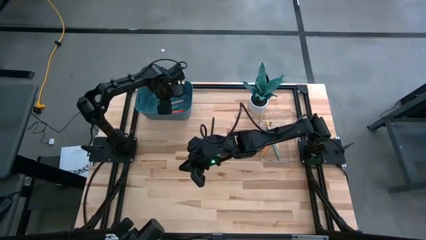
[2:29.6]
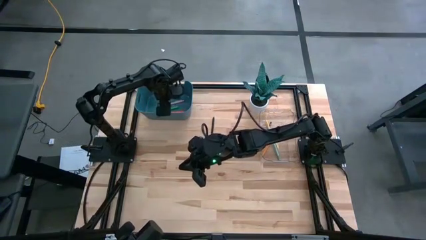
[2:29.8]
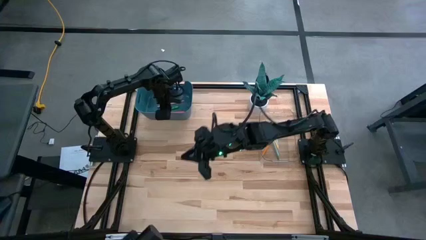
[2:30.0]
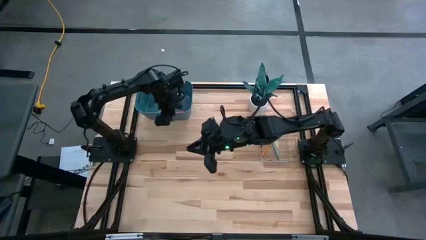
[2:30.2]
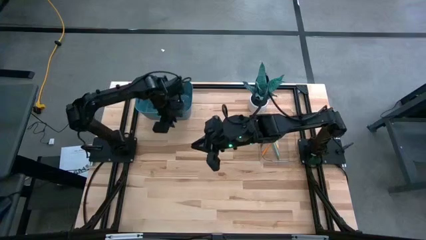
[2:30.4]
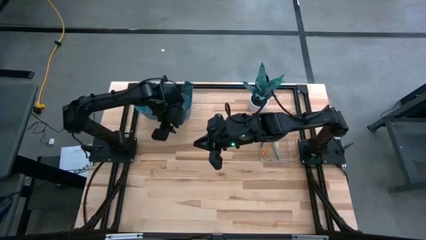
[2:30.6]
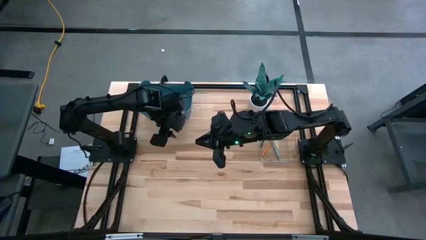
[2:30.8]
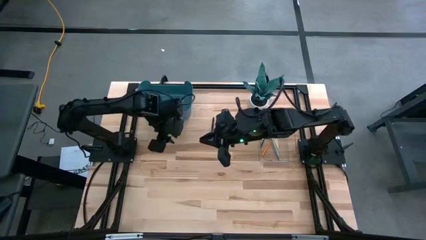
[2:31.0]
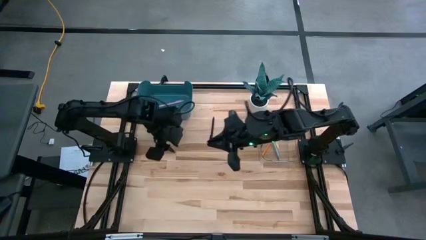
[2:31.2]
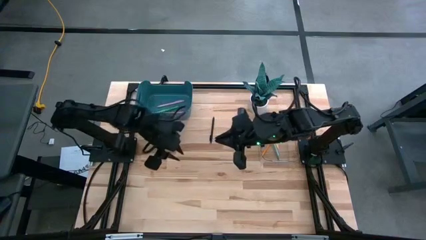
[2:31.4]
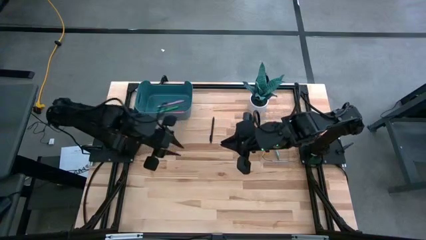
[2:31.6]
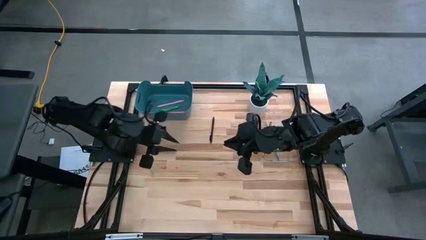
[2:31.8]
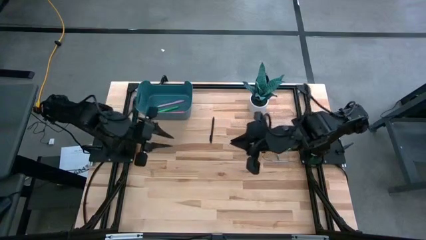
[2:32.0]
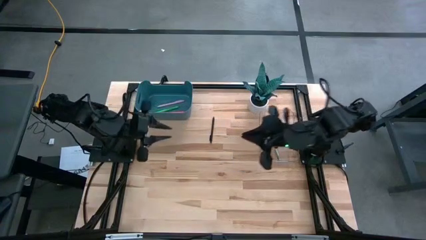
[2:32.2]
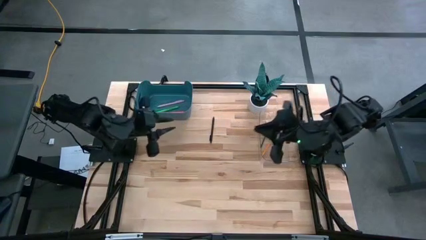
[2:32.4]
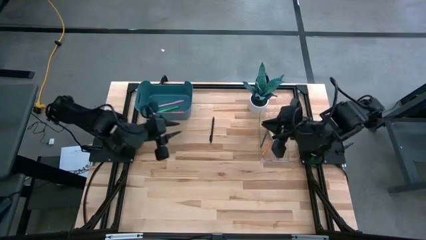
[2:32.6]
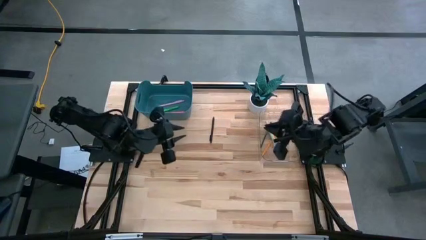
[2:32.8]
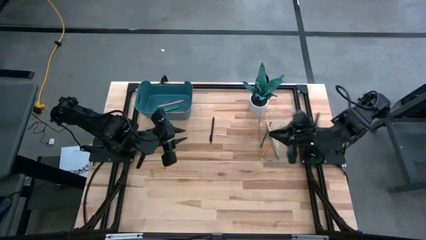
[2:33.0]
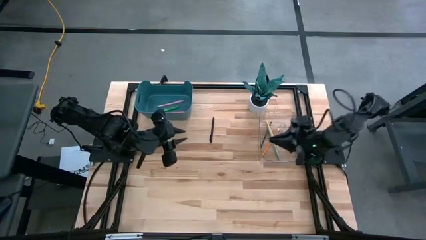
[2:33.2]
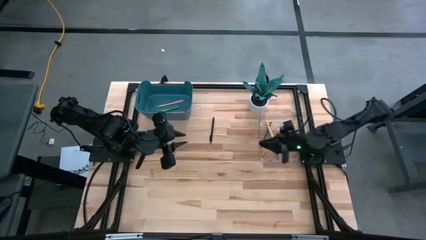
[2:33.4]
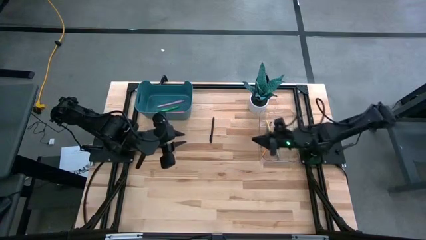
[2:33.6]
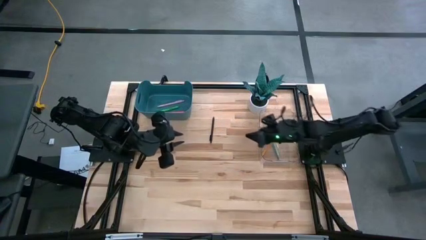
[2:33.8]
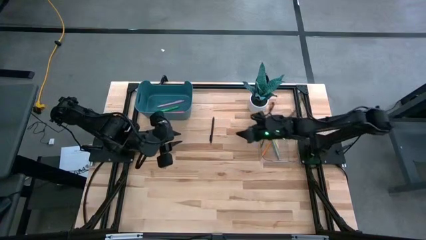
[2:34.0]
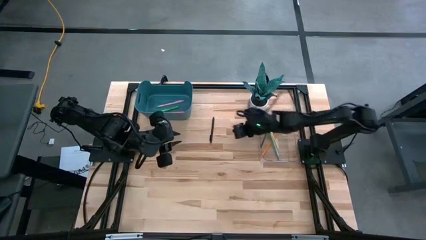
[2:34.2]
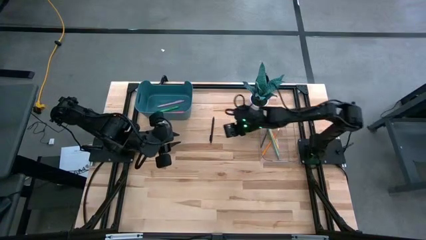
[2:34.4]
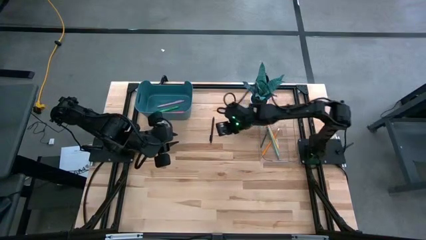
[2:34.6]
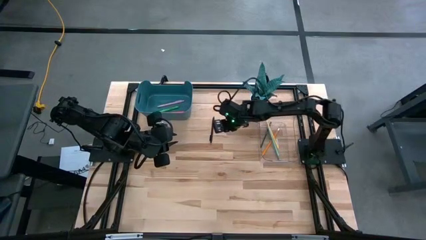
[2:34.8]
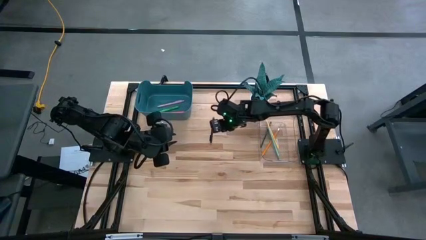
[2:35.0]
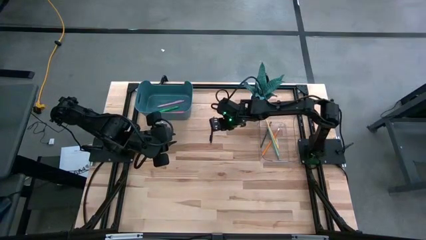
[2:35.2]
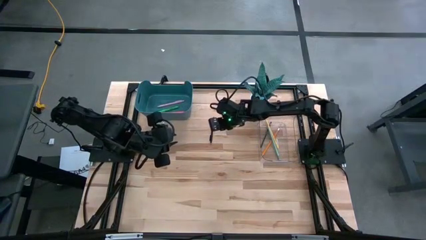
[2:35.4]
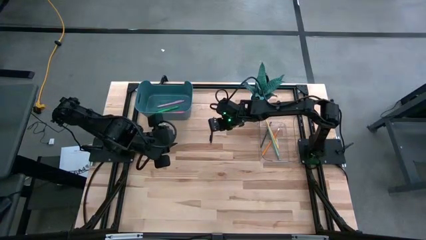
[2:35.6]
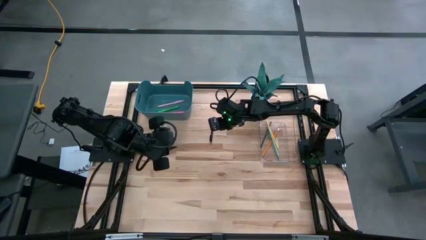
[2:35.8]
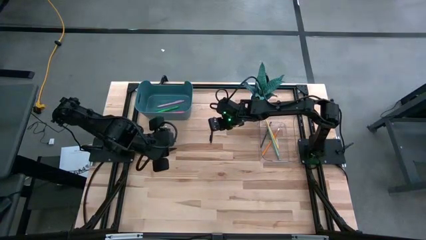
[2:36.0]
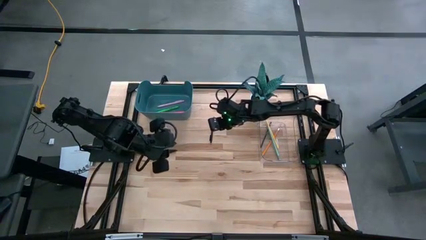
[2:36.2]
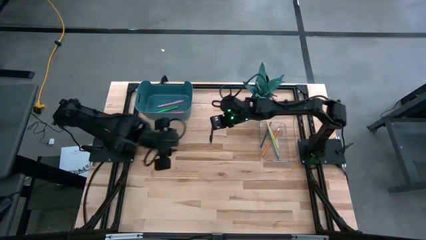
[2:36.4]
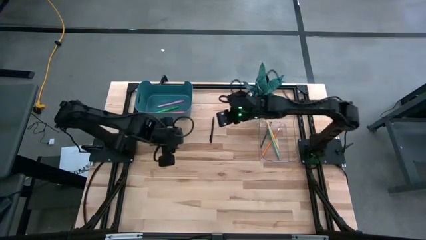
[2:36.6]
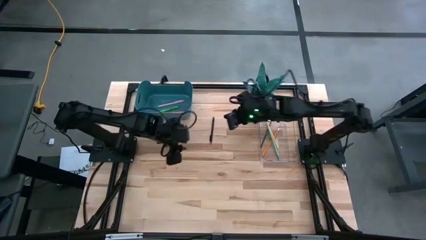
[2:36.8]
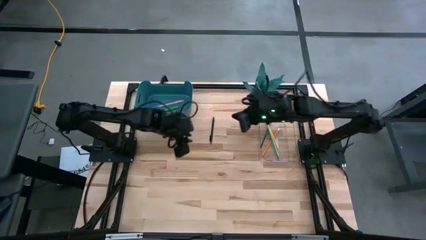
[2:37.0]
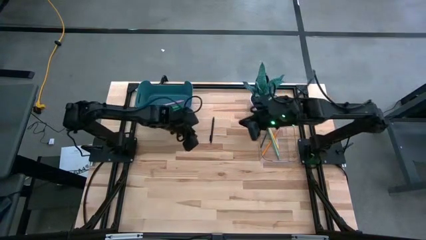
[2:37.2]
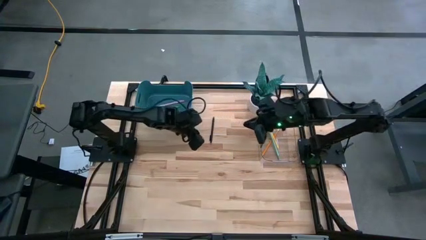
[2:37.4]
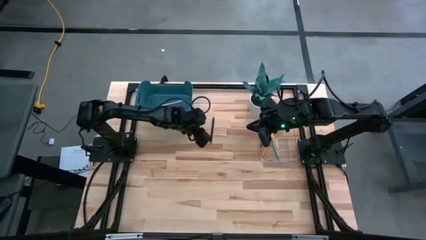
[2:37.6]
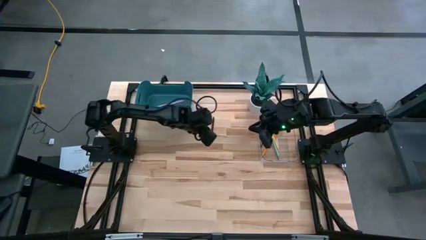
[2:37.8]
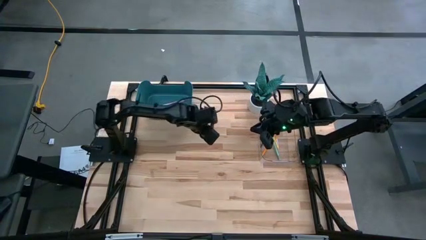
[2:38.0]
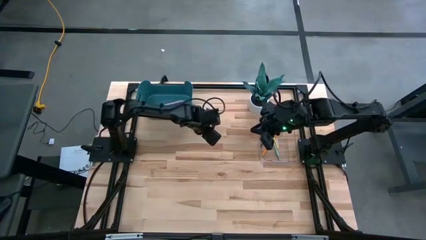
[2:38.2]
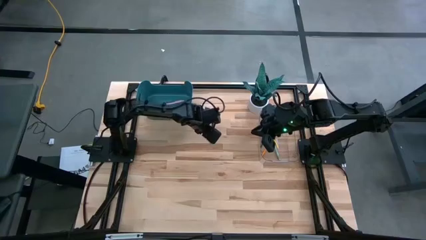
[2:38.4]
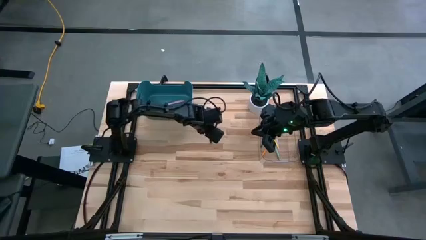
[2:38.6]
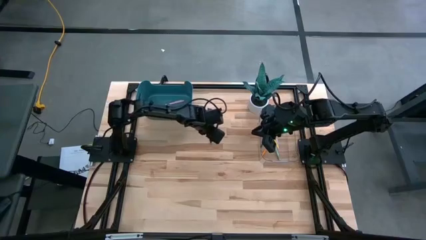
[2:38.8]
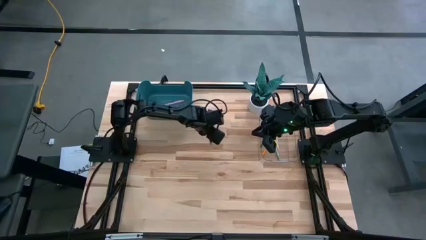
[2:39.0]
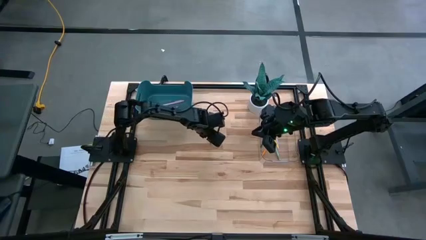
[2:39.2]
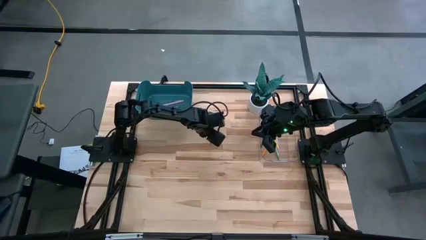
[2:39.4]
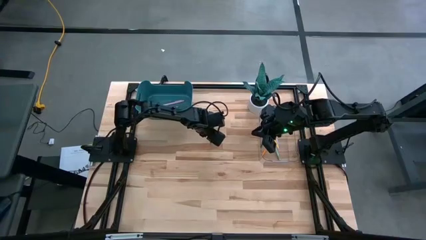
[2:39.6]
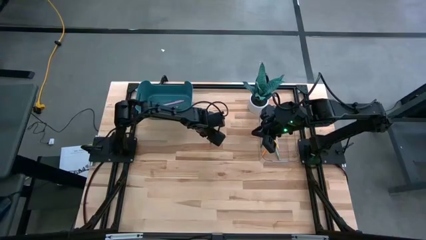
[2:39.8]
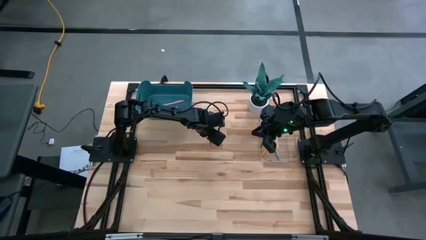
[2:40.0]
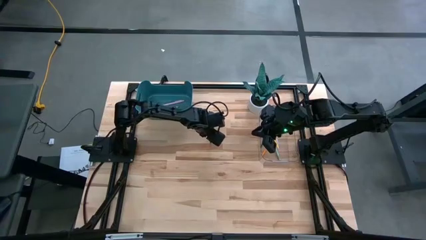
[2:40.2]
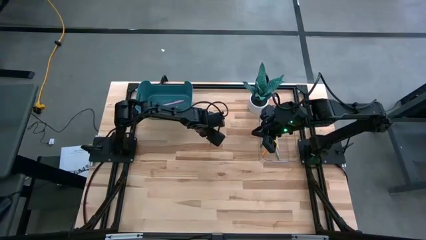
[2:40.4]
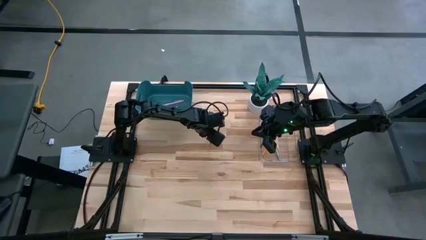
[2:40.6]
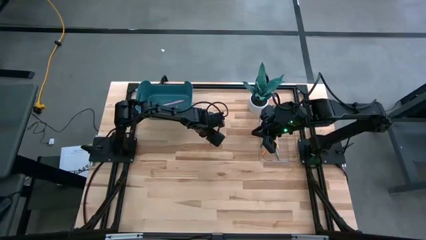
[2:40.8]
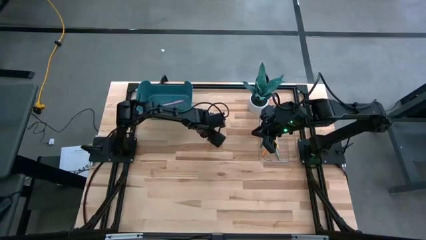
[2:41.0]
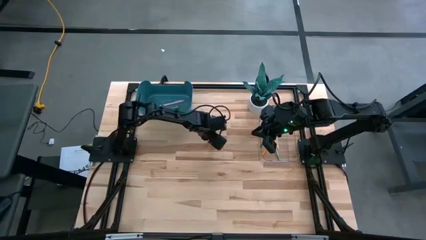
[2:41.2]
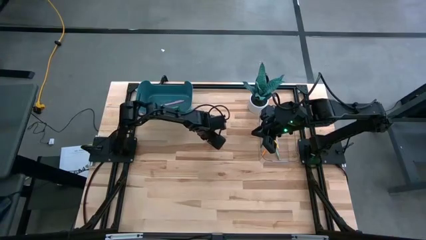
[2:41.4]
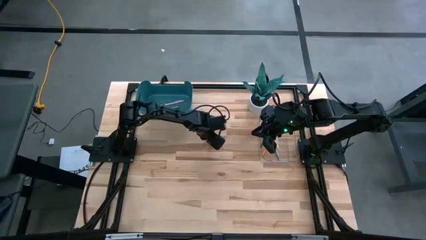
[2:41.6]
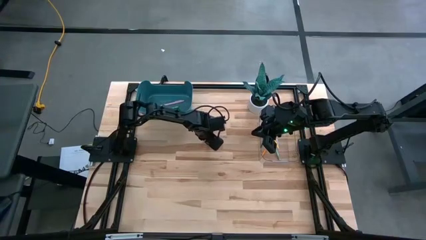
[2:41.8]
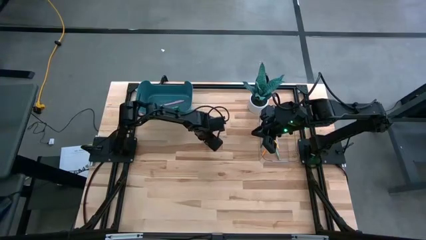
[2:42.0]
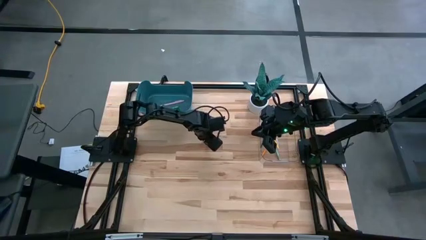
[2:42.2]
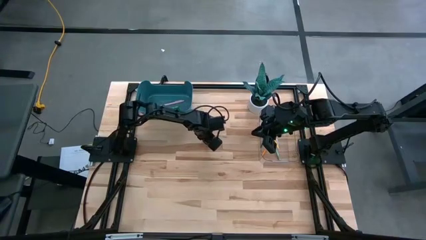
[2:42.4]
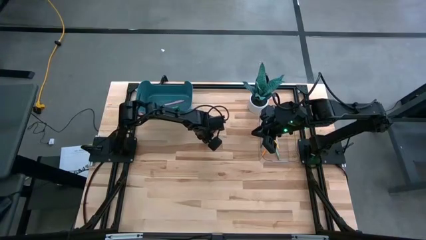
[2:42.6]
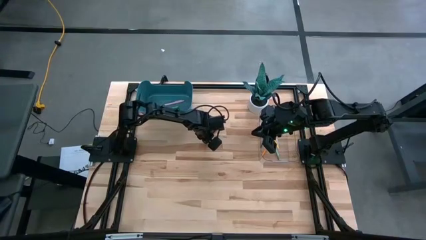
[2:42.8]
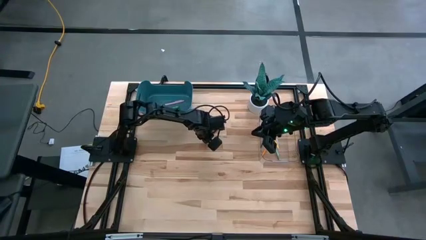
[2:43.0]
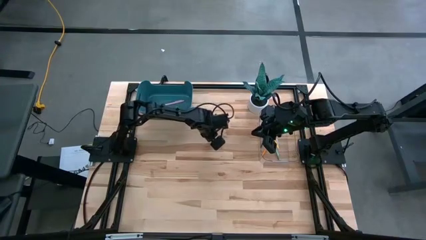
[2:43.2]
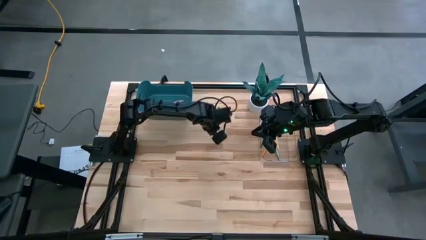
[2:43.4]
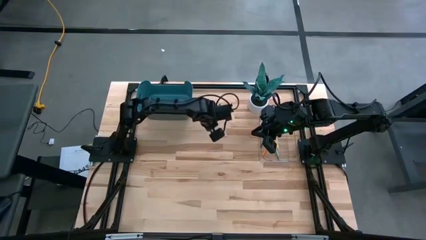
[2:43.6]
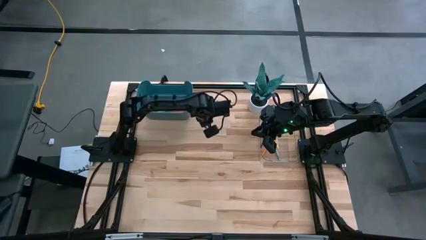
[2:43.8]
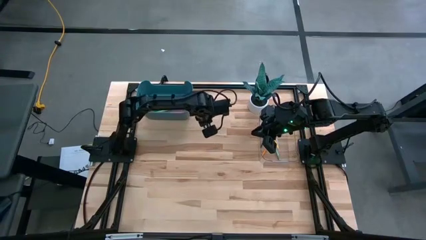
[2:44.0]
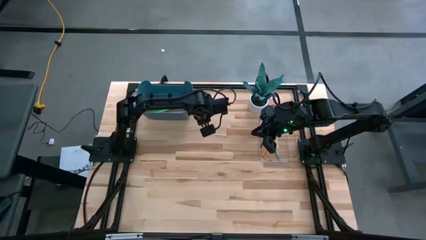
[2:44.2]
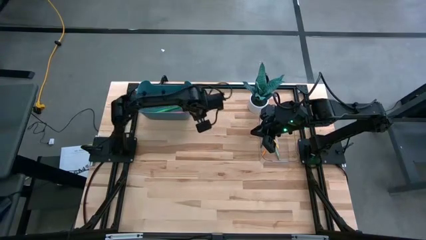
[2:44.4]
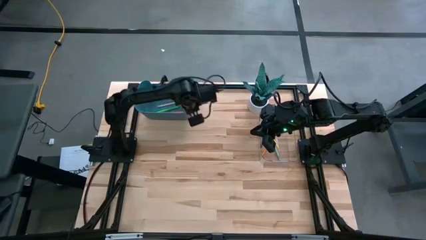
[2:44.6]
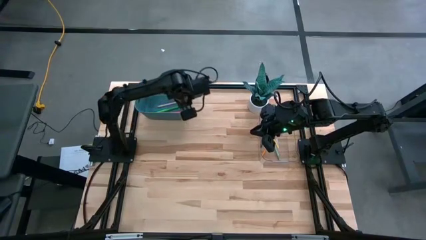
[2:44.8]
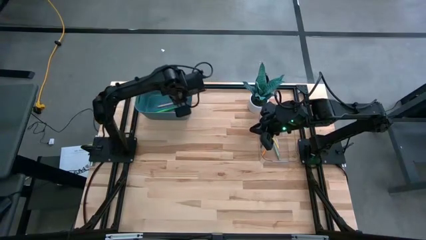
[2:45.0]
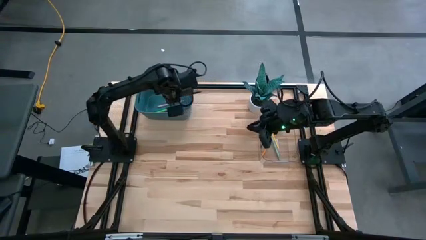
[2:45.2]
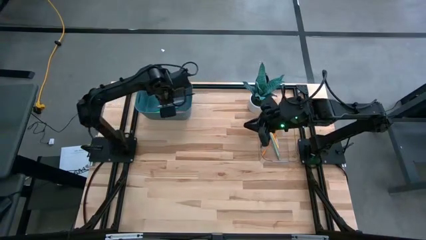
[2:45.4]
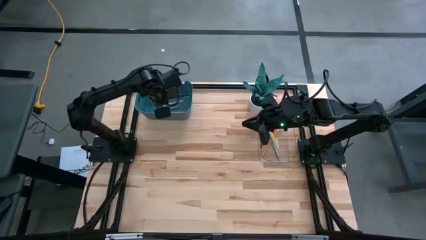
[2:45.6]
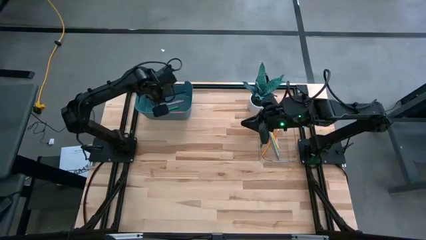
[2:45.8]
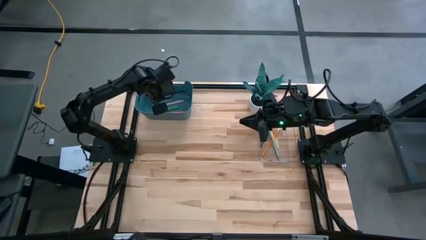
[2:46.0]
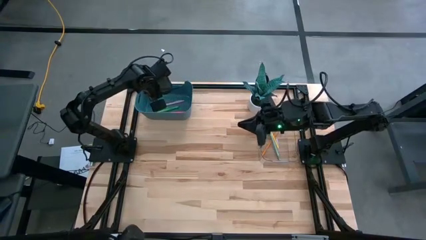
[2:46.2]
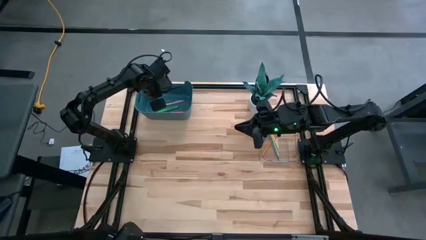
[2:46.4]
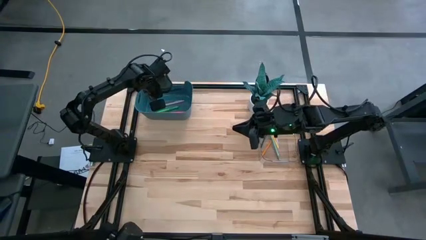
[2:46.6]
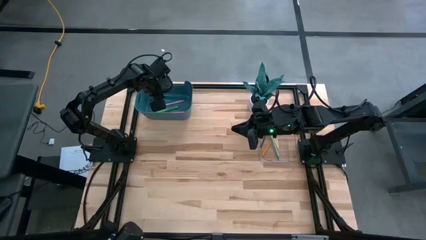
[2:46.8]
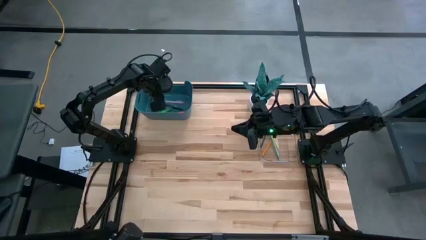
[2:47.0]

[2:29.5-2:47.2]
Task: Sort pens & pencils
Put the black pen into the blue bin
